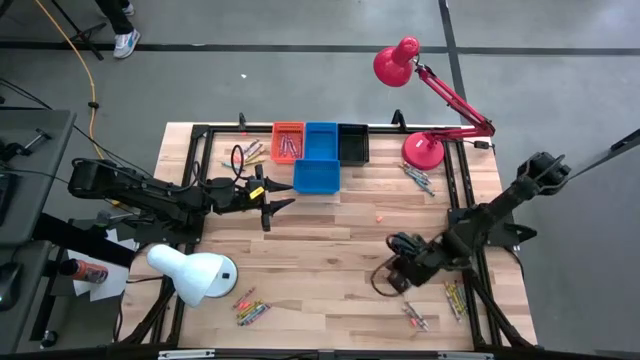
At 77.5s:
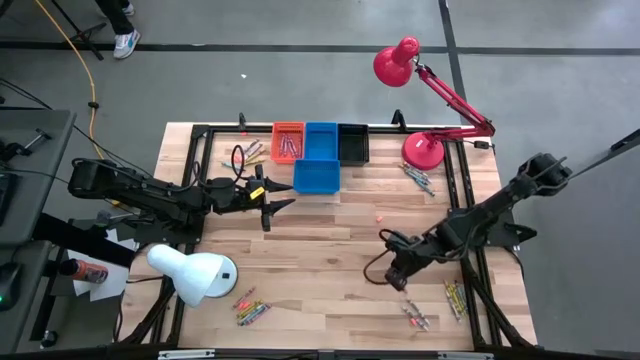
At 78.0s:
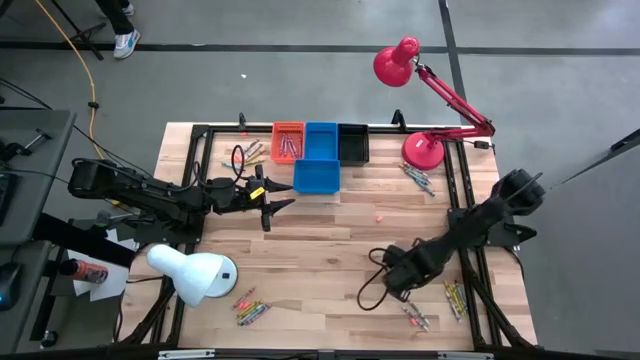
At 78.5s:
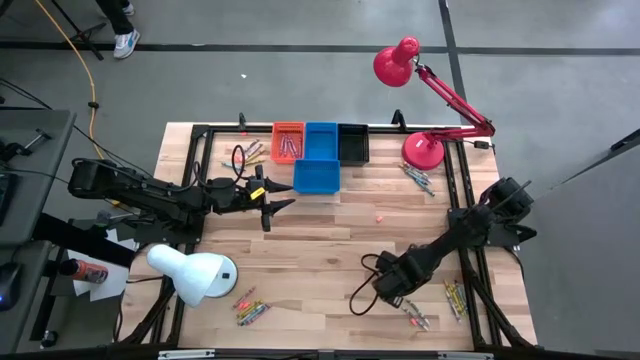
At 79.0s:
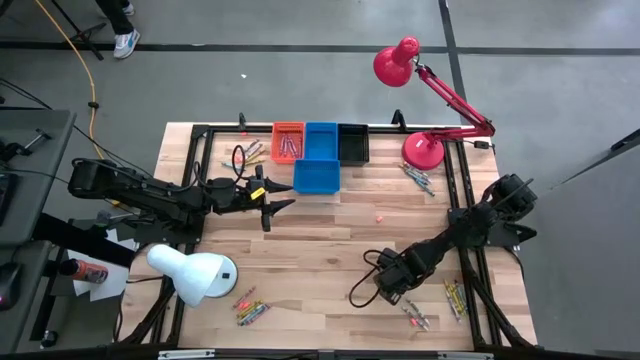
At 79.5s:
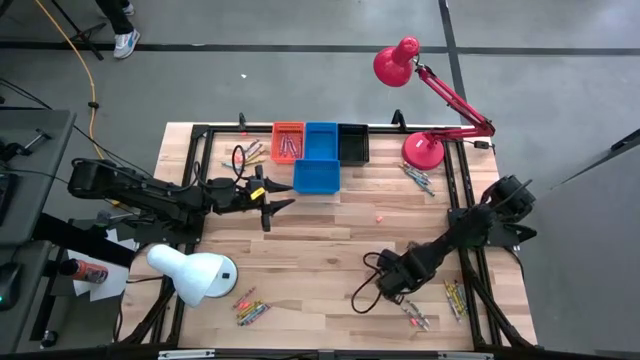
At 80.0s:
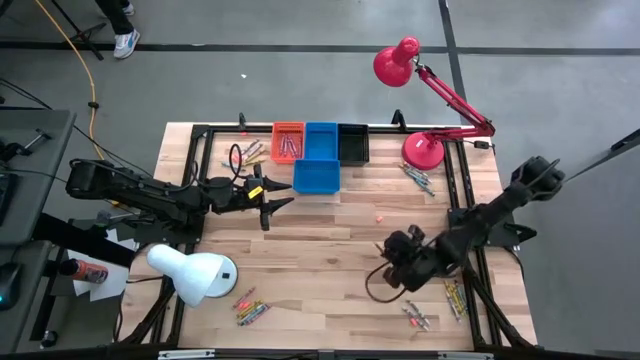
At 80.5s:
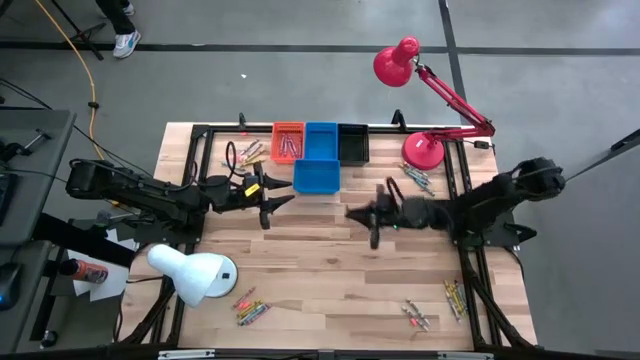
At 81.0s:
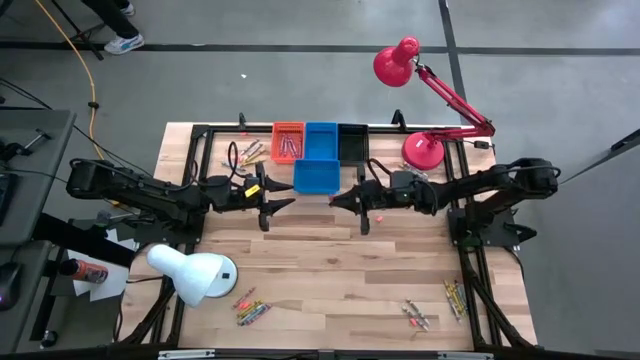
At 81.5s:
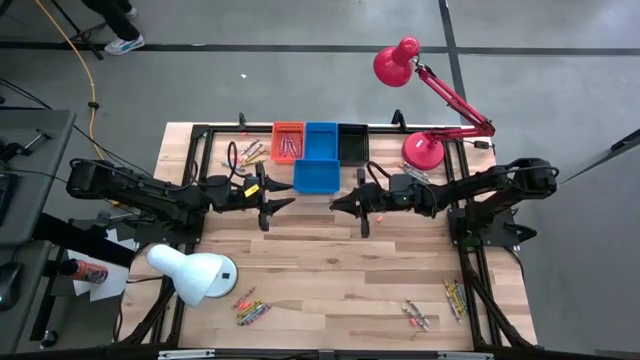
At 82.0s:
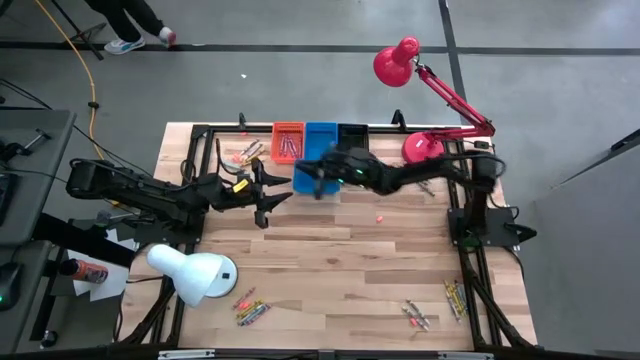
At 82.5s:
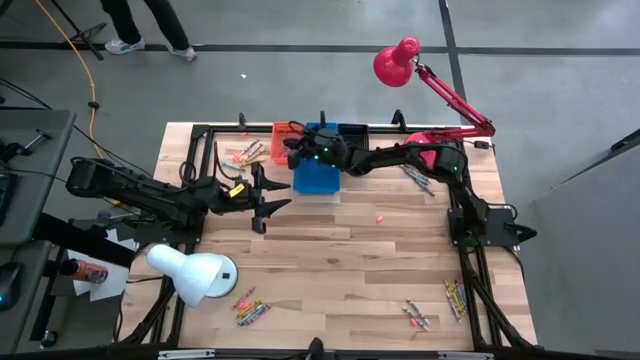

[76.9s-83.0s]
Task: Sort crayons
Put the pink crayon into the orange bin

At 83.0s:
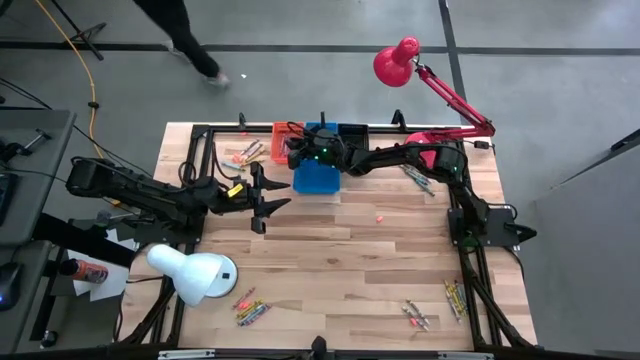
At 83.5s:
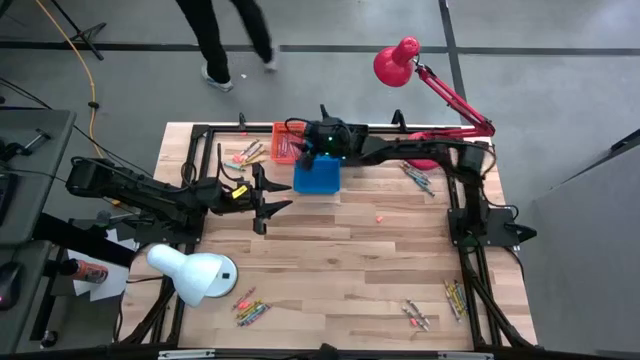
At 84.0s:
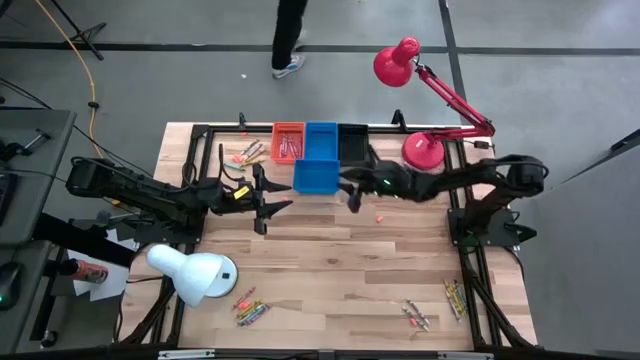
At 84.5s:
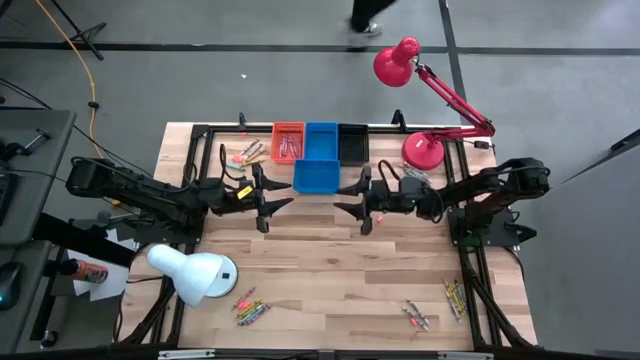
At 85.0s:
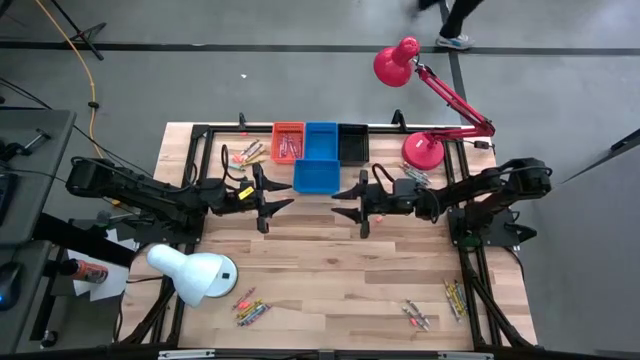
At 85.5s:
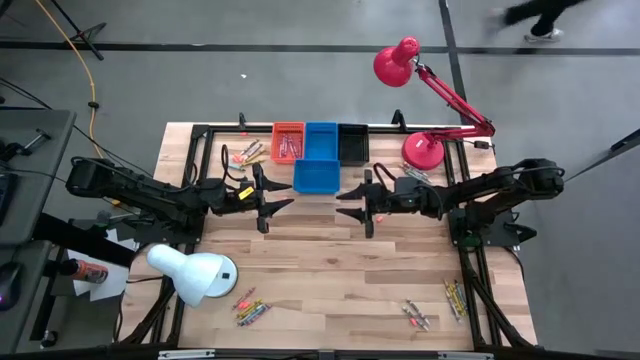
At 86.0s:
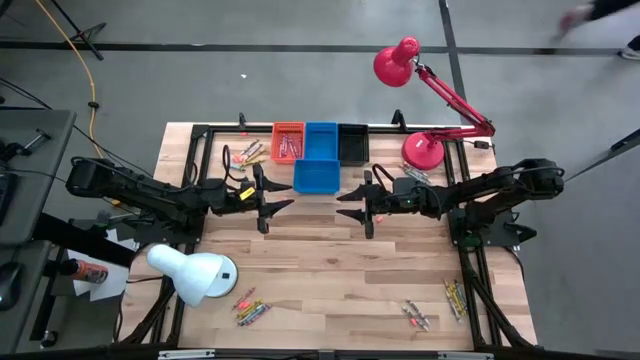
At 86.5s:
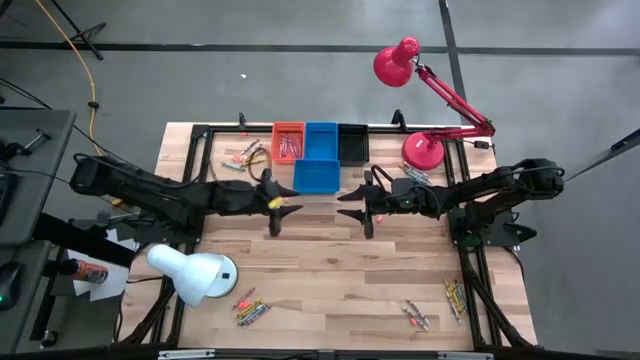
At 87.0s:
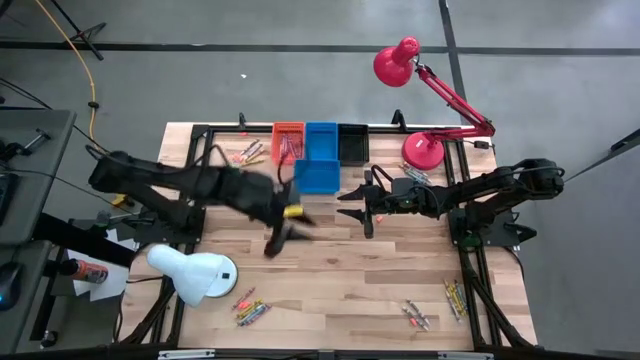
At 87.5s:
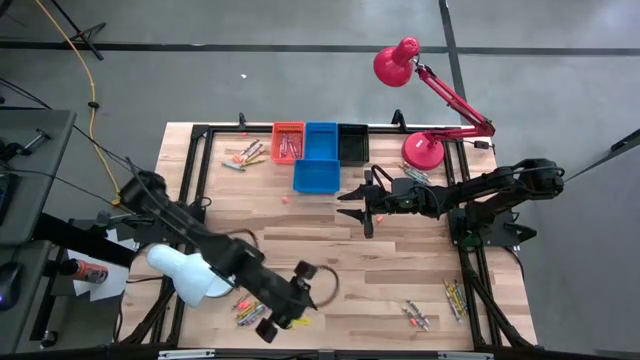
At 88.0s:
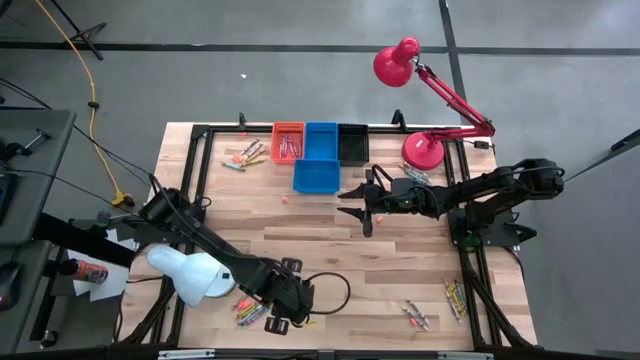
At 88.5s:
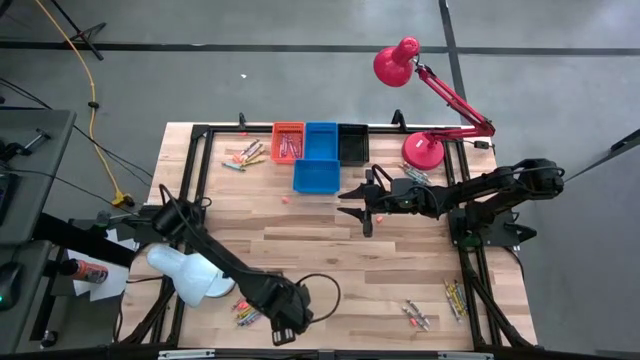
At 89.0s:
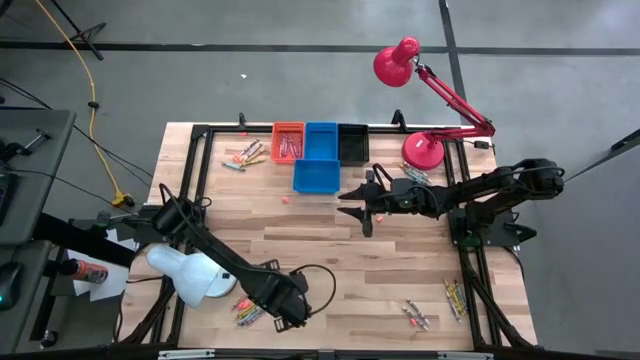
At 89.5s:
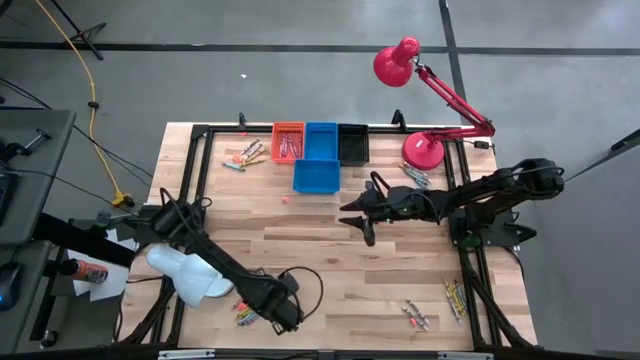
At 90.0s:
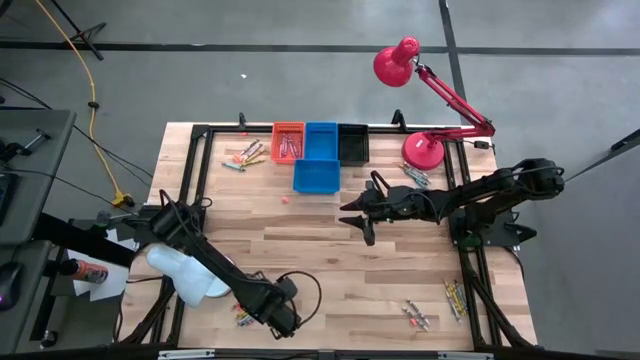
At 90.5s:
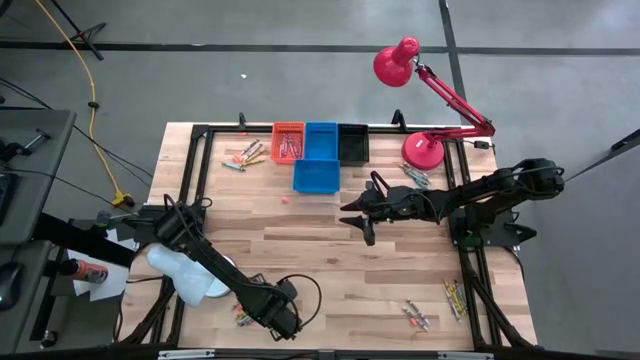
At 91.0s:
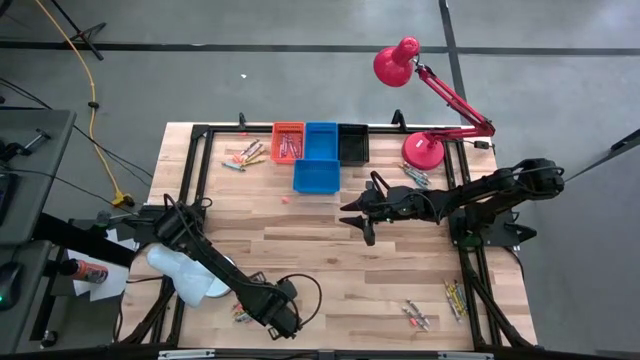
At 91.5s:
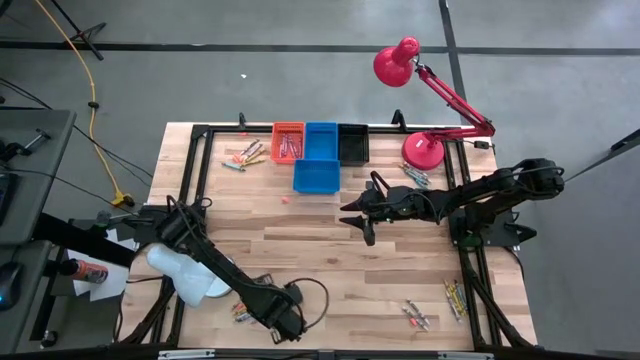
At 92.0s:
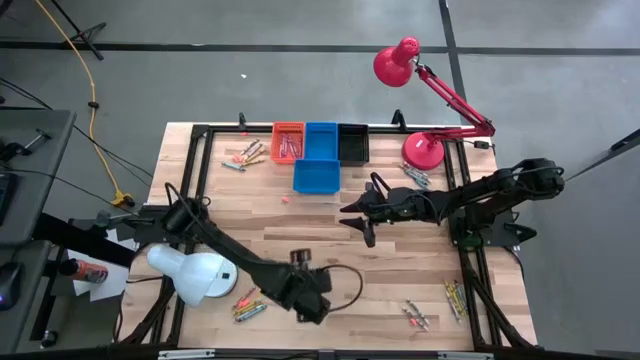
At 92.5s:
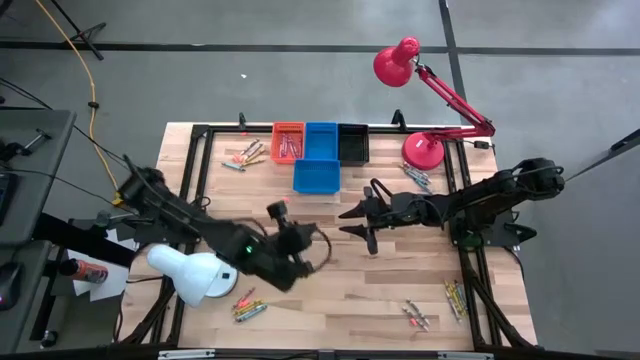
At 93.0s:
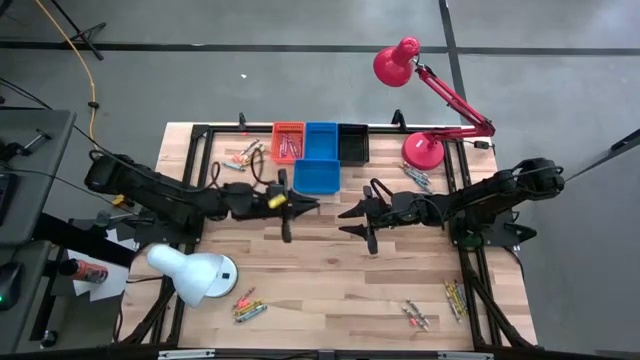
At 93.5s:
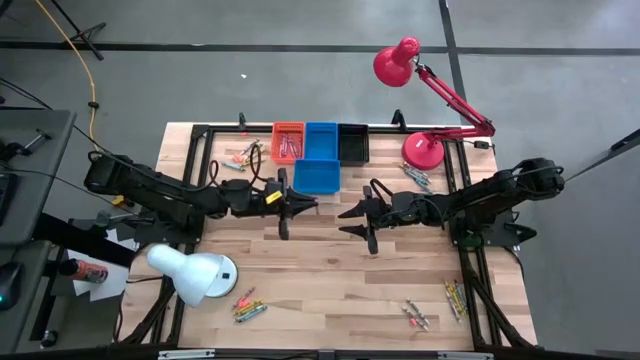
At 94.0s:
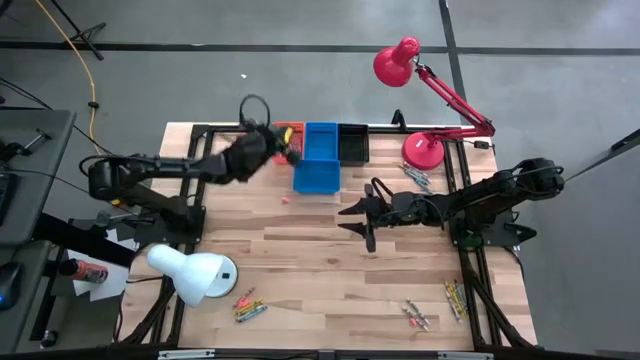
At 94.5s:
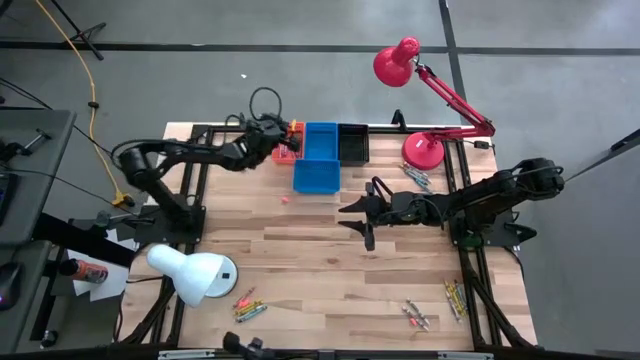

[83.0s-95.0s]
Put the pink crayon into the orange bin

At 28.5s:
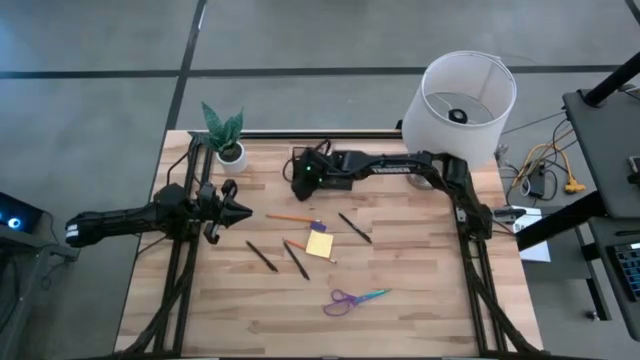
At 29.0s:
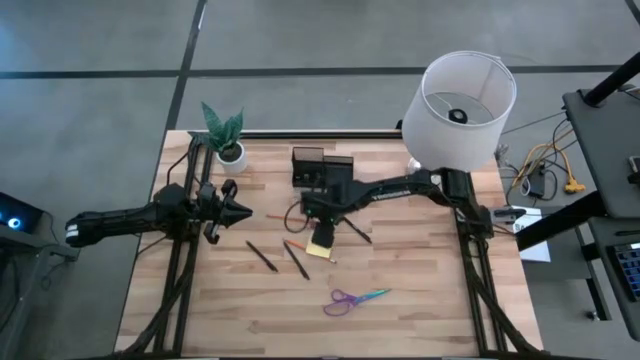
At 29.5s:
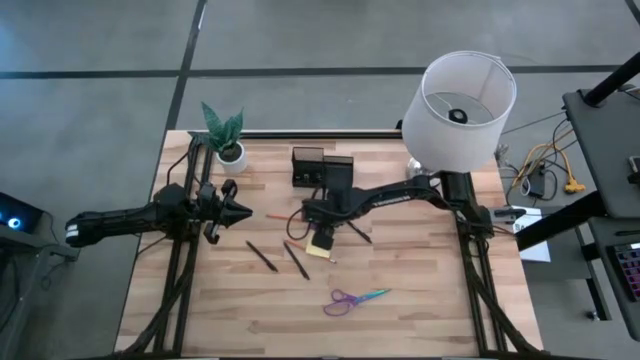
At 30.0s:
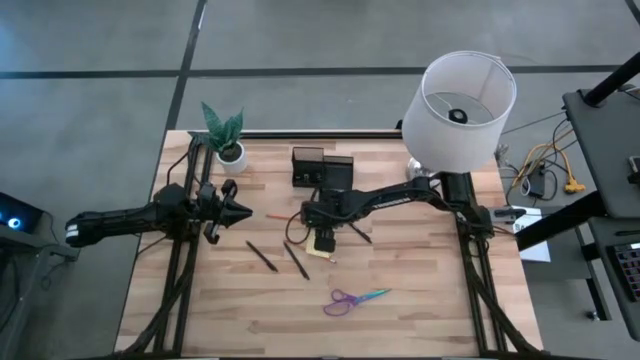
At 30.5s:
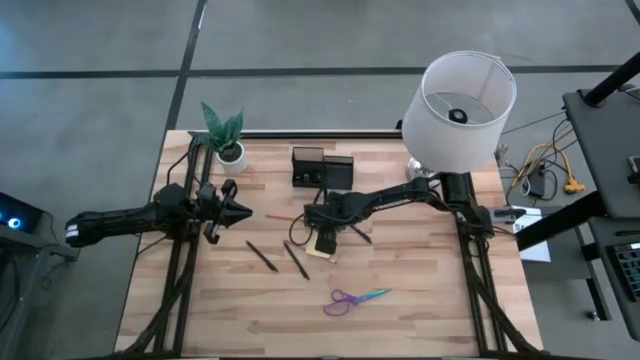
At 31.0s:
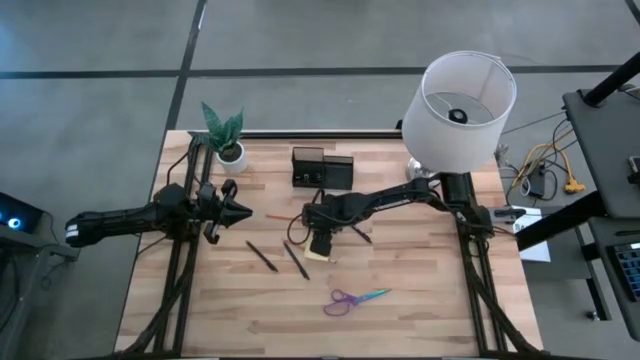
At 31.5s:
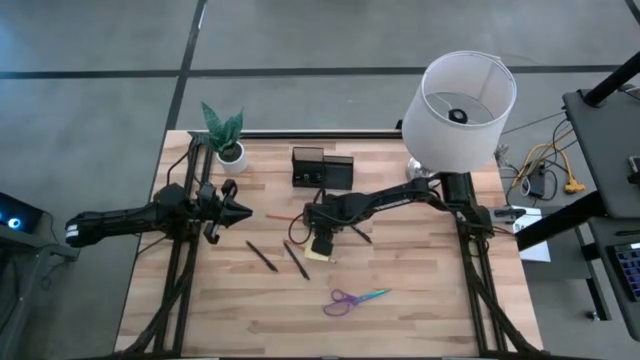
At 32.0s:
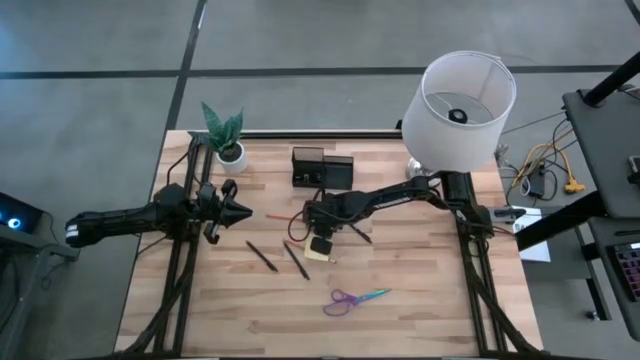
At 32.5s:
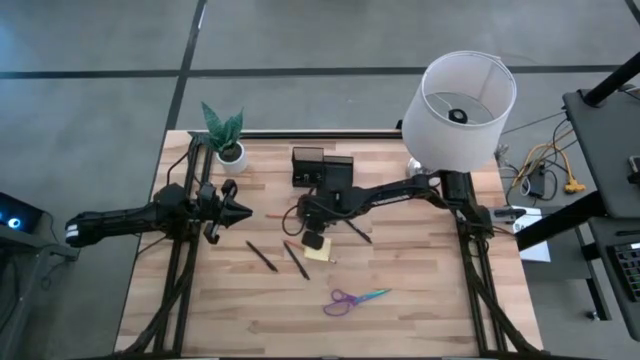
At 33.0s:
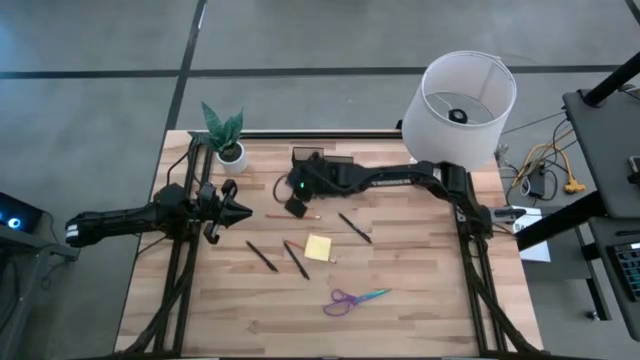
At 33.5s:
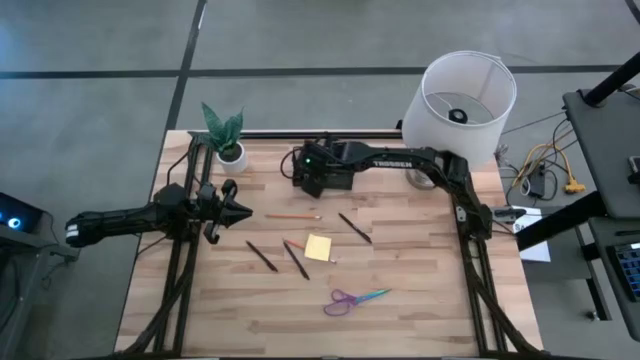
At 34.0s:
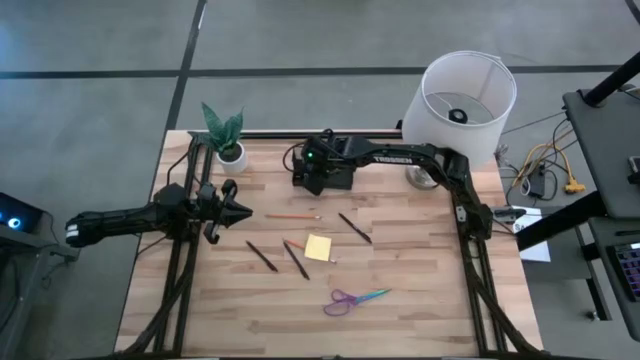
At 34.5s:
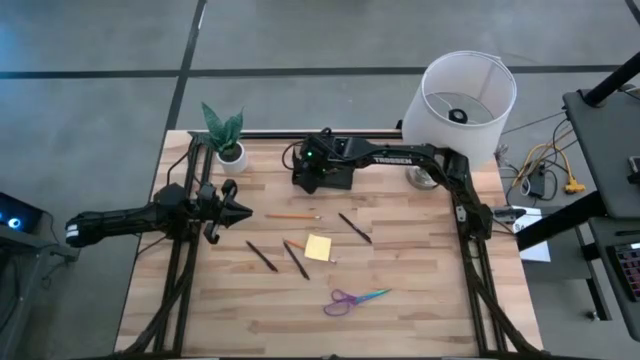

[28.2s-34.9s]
Task: Pick and place office supplies into organizer
Put the blue eraser into the black desk organizer
